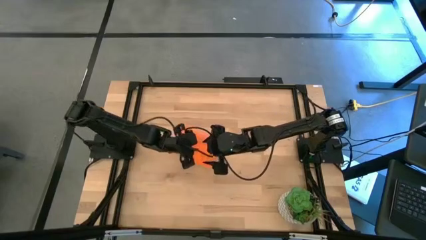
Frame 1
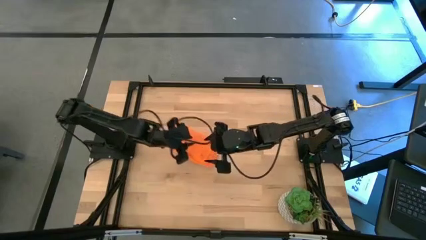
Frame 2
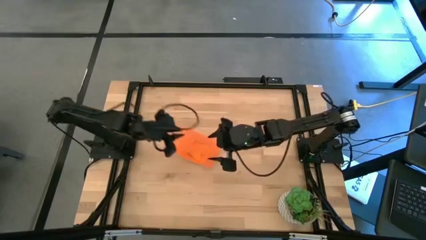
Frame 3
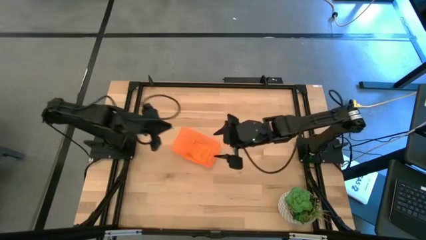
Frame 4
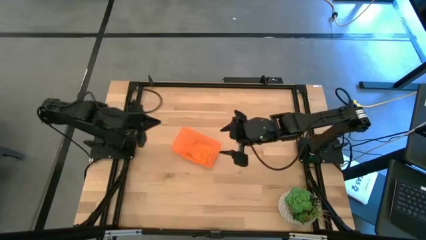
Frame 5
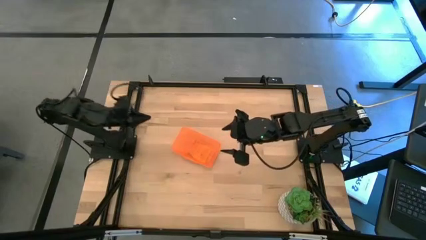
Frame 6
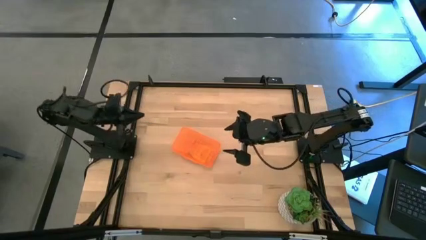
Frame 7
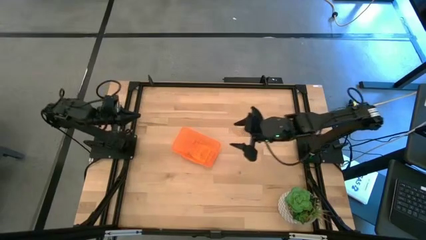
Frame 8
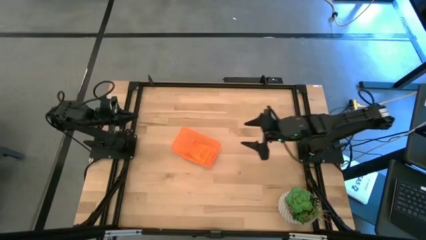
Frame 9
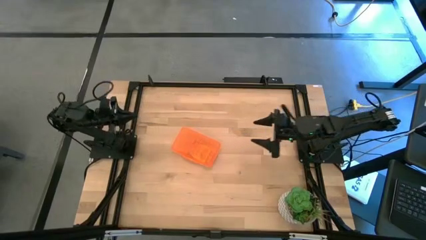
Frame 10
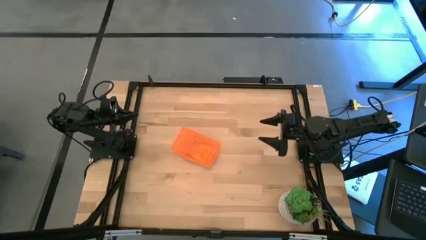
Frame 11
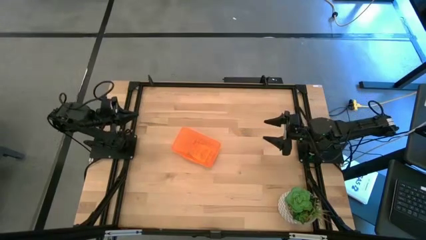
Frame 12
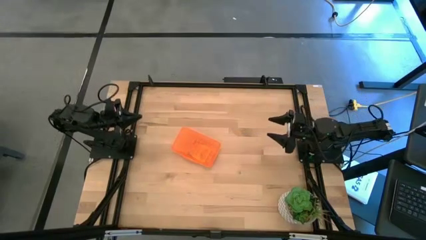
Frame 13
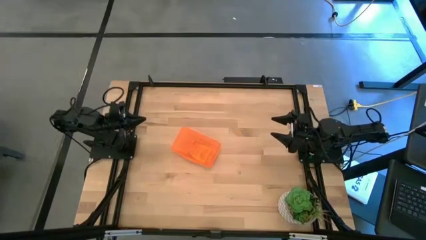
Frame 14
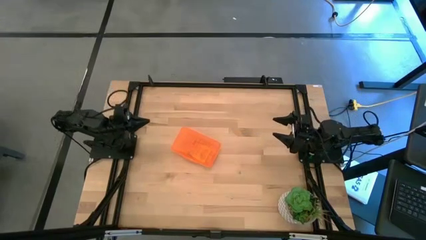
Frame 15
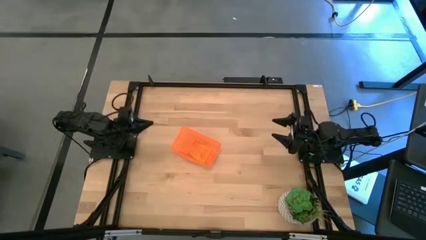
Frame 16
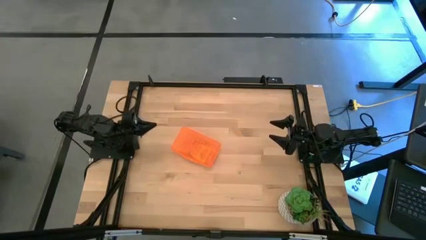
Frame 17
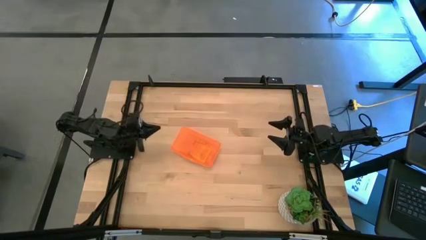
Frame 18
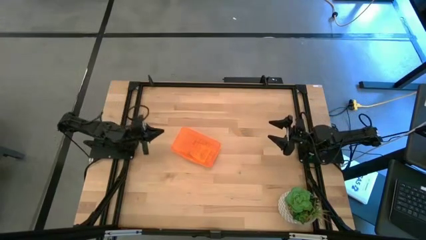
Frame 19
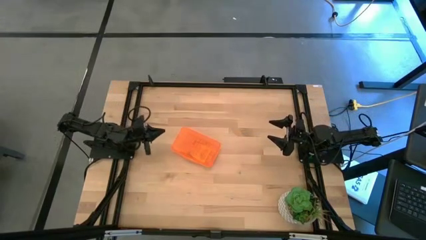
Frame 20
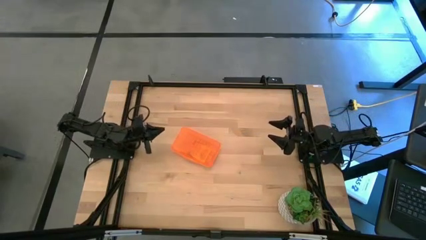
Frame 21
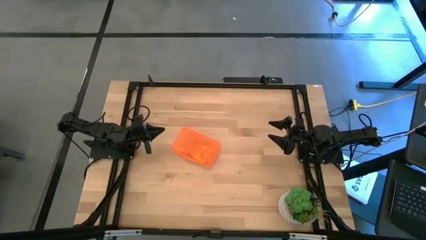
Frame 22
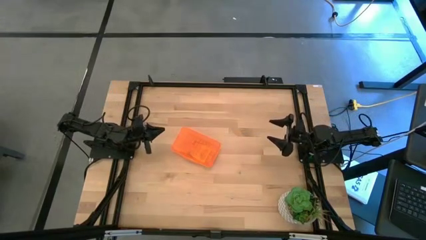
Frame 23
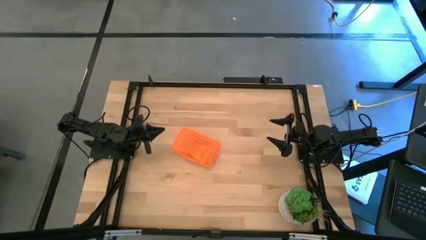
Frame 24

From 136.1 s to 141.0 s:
Task: Pack school essentials
Return to Home Position

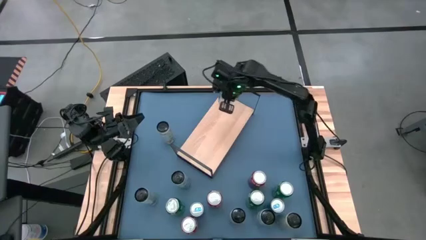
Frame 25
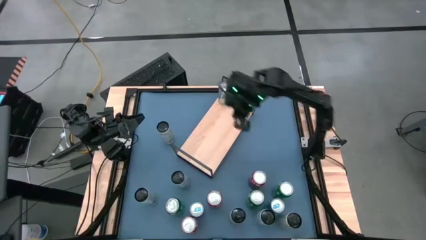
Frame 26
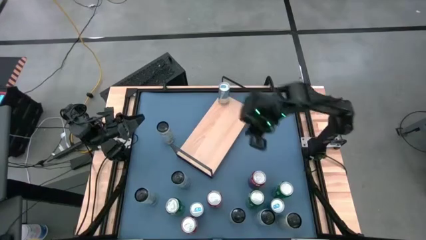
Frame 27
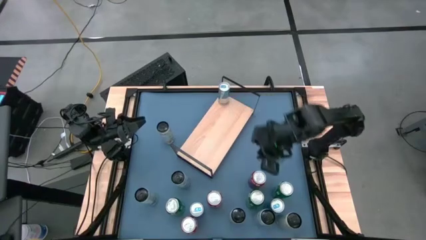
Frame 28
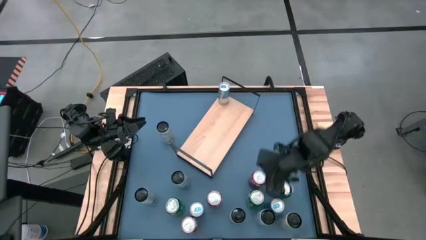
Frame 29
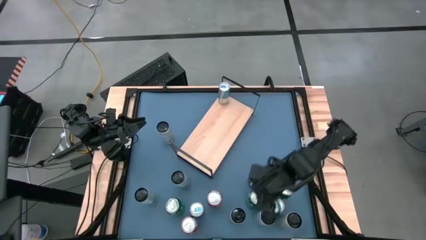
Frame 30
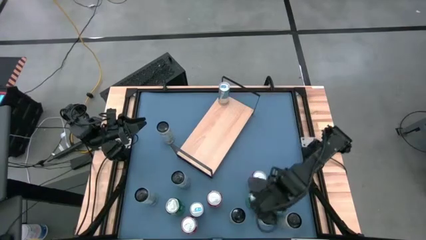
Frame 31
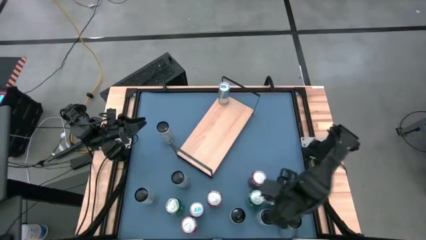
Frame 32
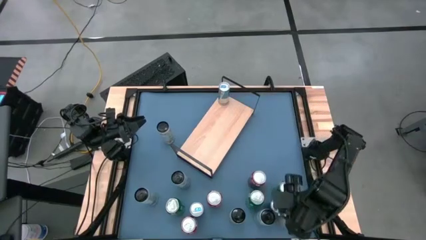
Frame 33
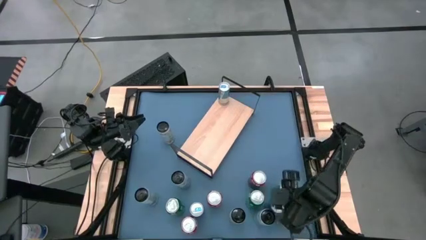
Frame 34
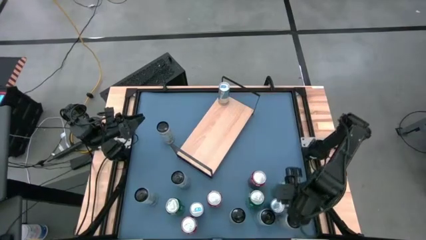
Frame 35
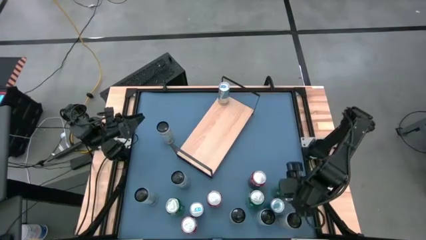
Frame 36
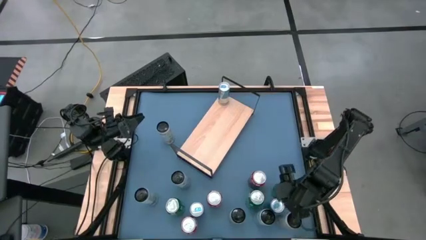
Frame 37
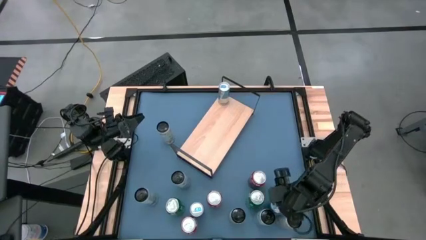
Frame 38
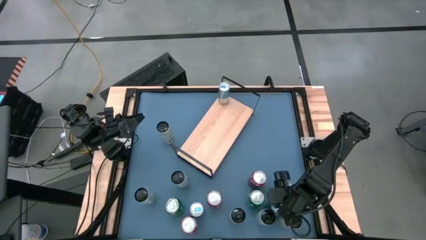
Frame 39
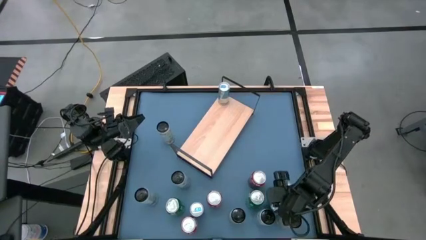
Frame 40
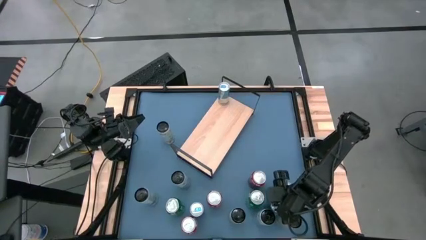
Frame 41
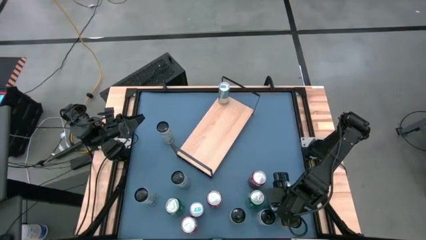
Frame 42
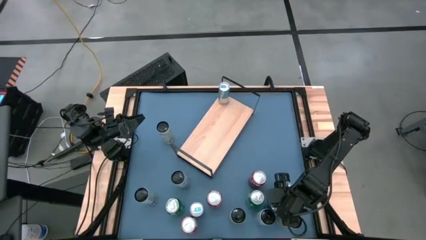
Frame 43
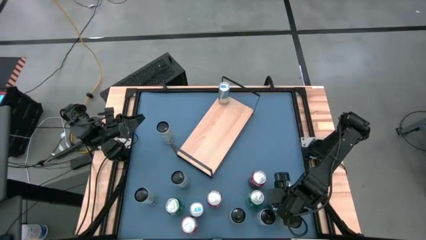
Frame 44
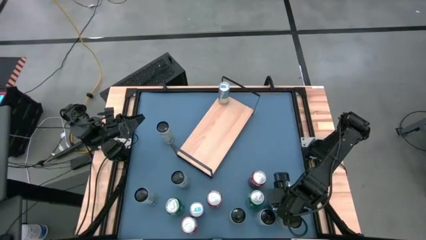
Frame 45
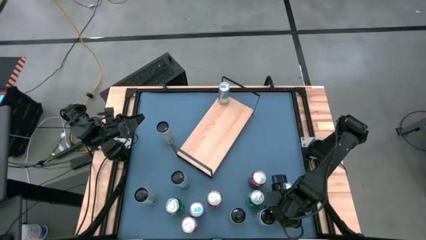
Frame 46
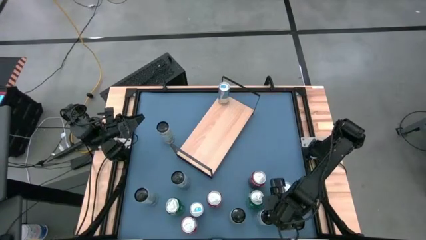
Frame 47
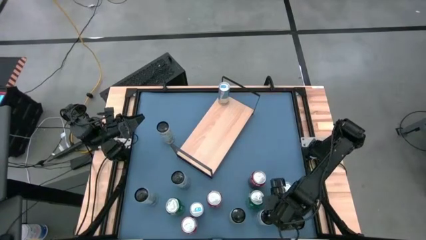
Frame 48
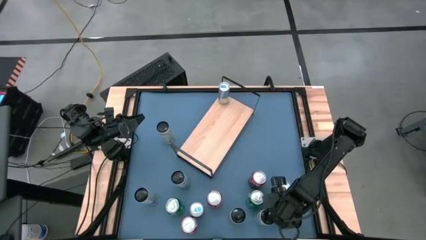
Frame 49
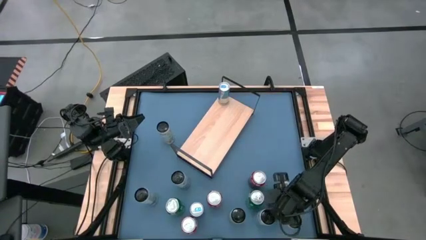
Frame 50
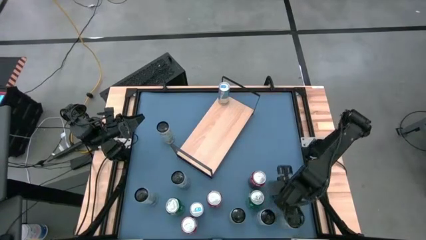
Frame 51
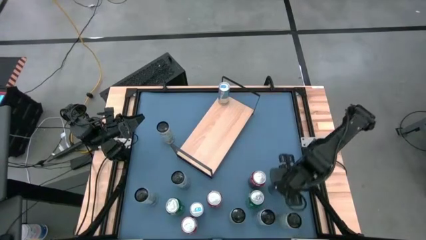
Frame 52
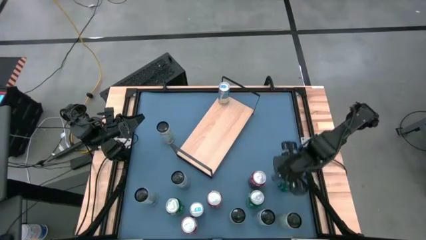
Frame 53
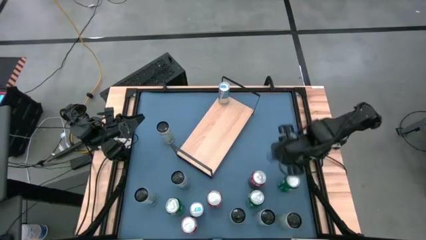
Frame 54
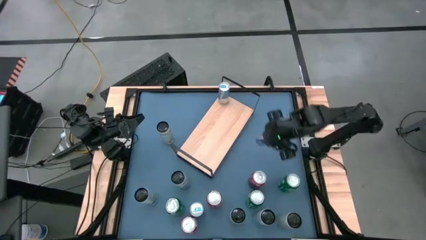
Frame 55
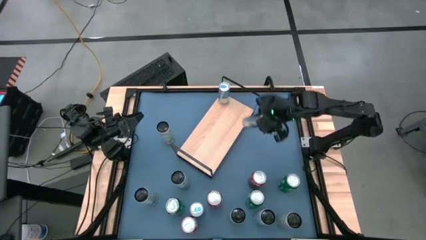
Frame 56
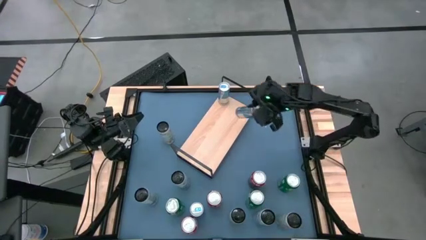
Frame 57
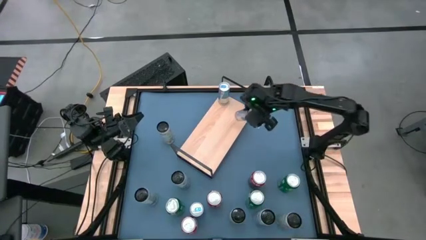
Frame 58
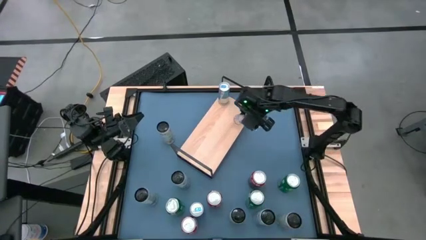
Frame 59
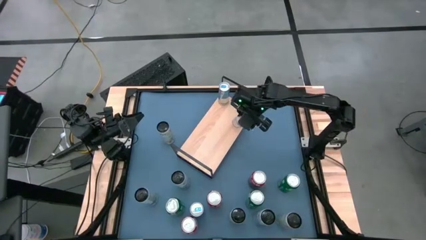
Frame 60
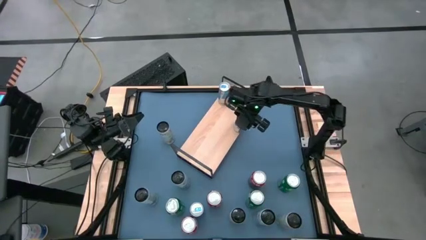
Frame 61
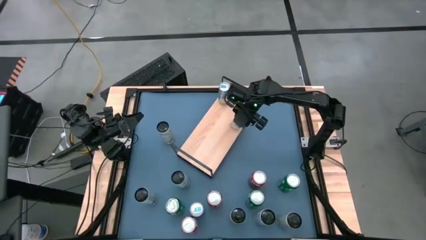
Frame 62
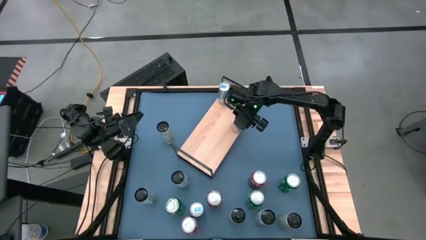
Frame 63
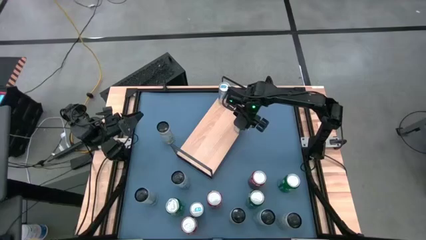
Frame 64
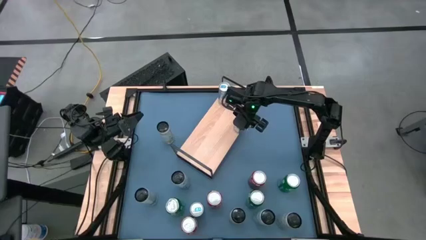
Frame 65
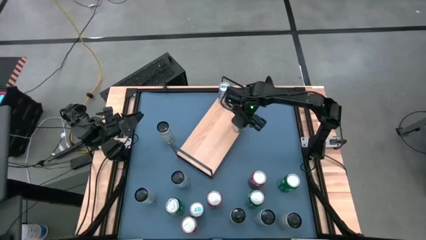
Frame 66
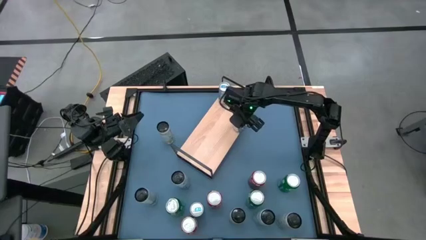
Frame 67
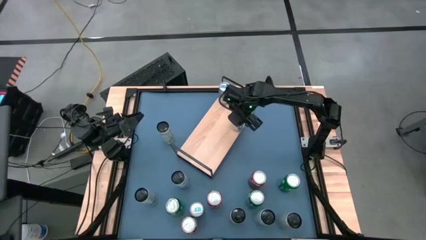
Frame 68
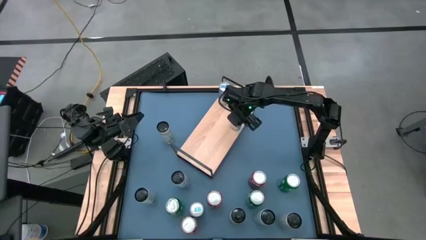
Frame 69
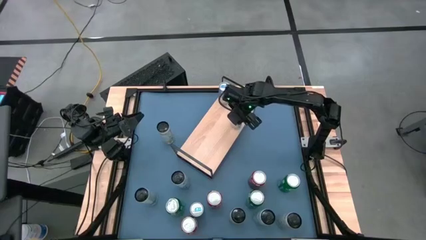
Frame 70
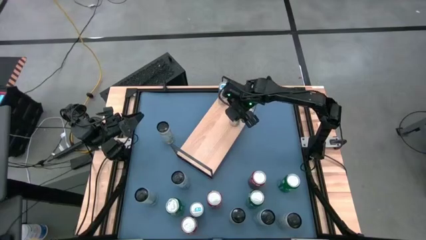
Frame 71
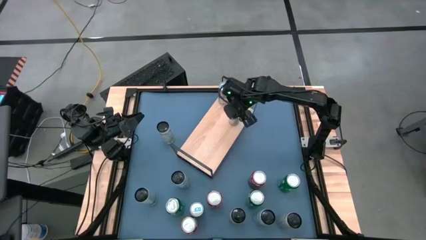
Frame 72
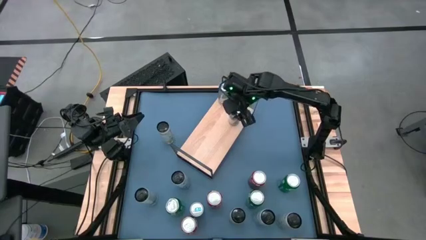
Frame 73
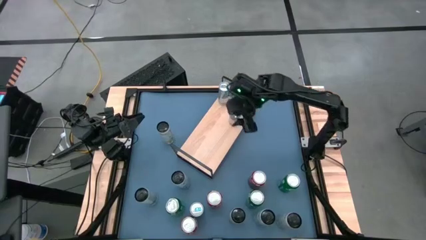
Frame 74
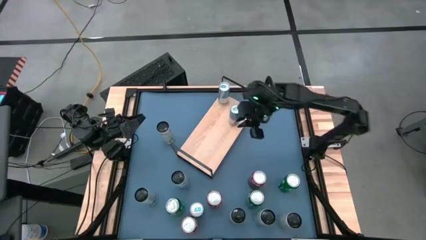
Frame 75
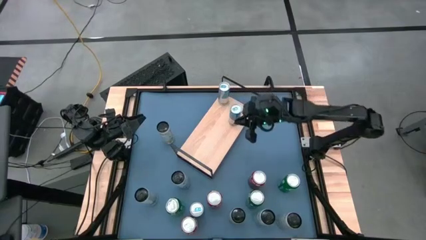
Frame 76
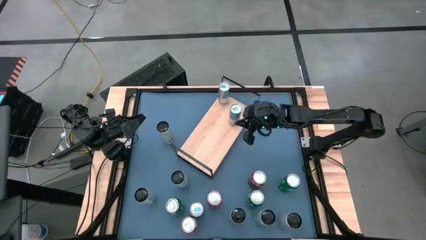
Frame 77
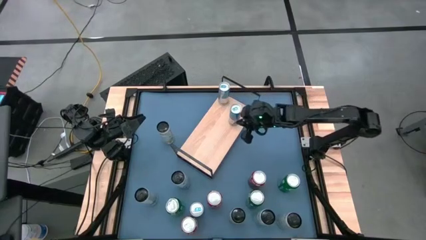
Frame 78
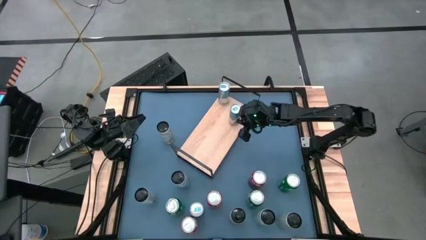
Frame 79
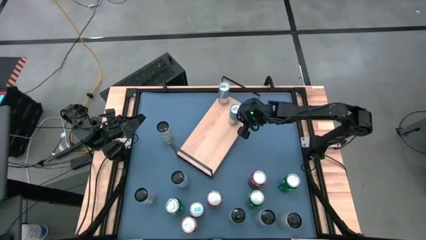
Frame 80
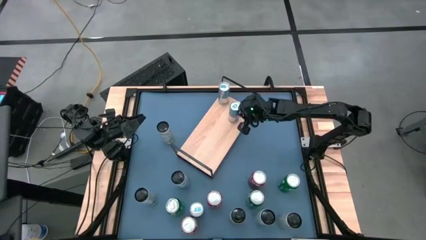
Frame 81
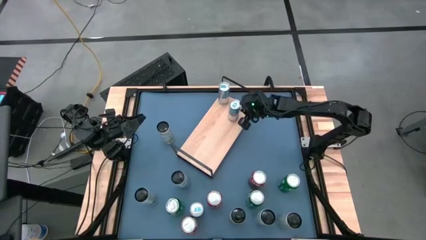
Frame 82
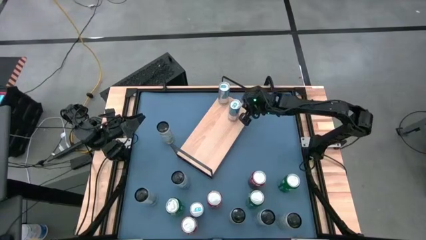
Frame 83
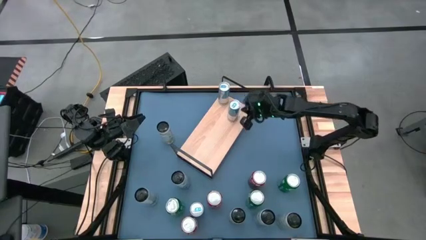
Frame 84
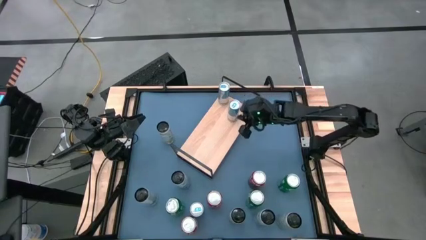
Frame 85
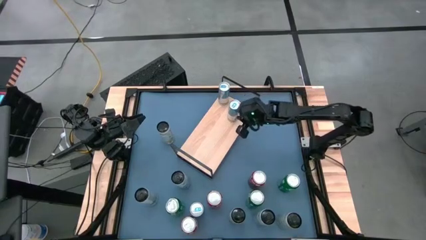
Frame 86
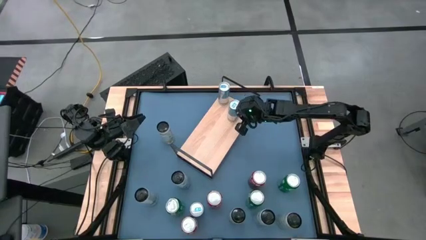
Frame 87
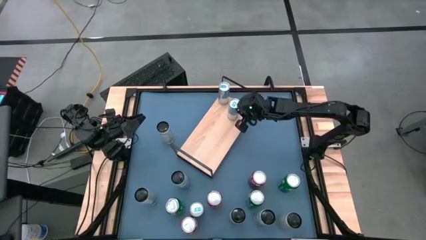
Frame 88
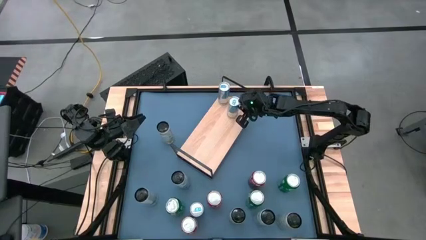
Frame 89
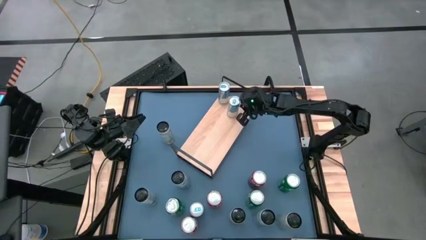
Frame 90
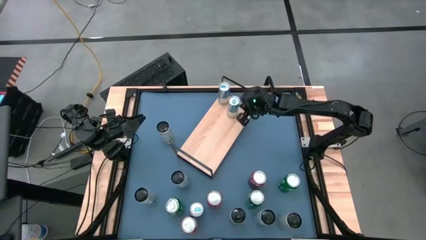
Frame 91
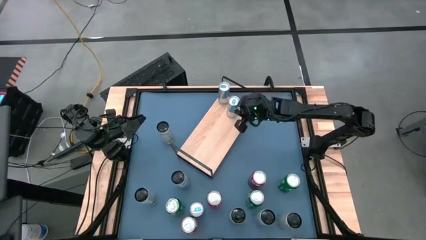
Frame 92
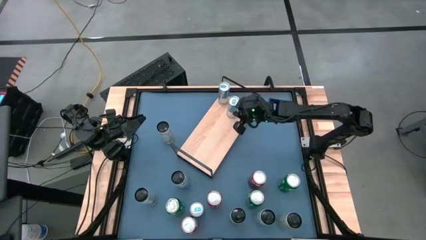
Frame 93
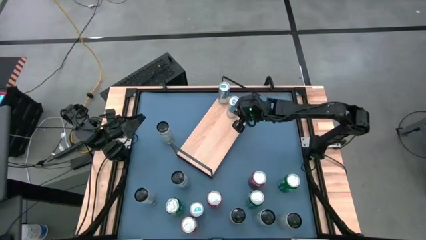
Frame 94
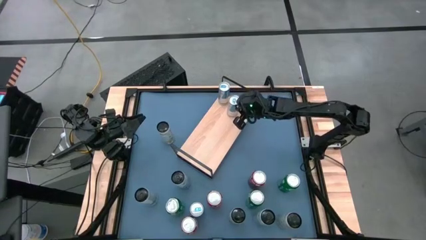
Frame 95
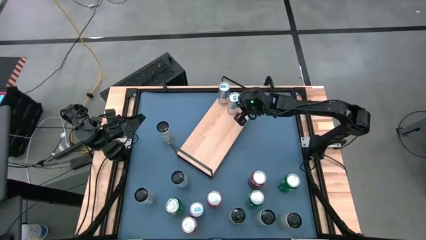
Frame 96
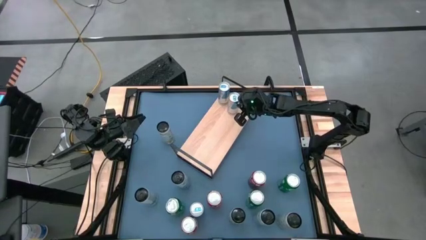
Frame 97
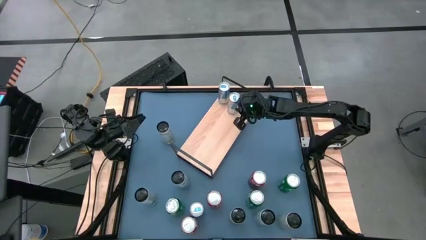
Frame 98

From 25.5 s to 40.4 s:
Task: Place canned beverage on shelf
Put right blue soda can on the shelf aligned with the other blue soda can
